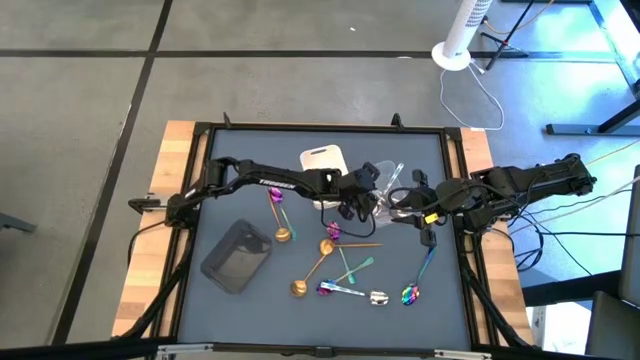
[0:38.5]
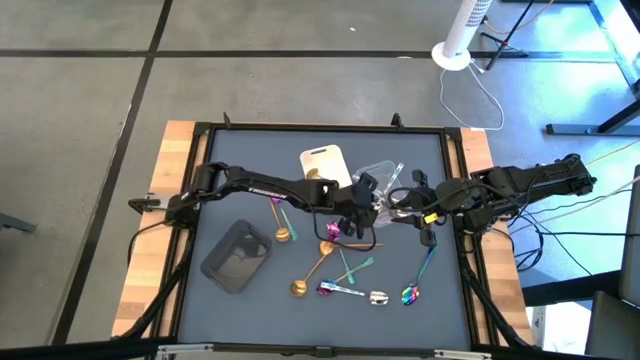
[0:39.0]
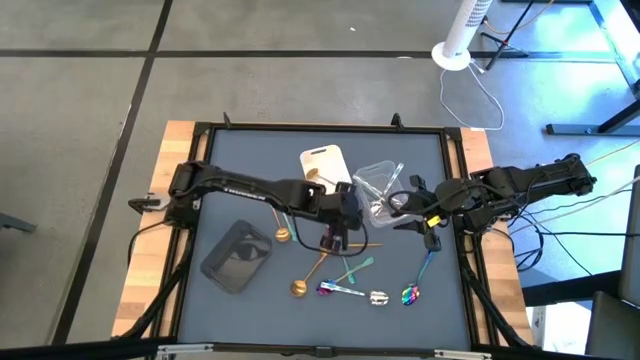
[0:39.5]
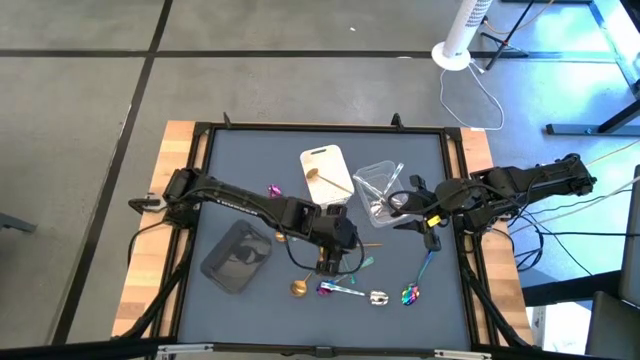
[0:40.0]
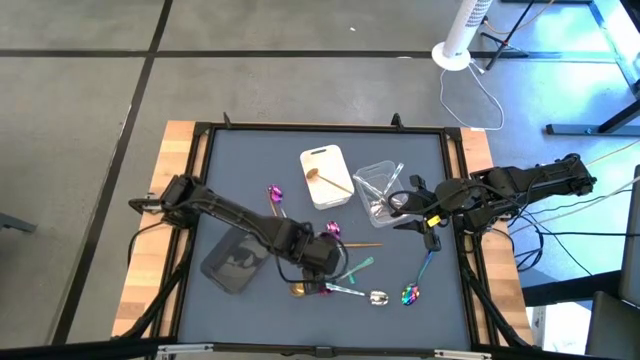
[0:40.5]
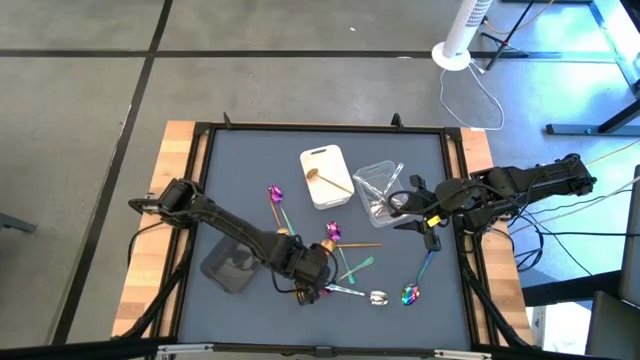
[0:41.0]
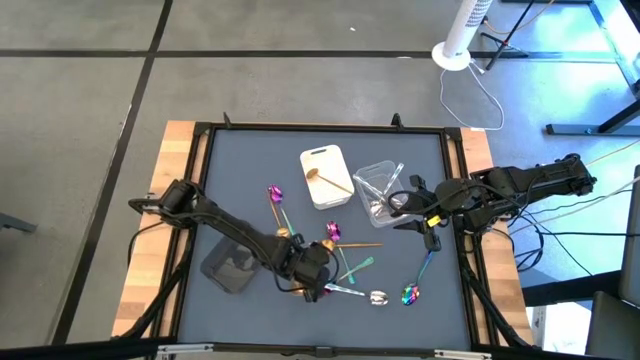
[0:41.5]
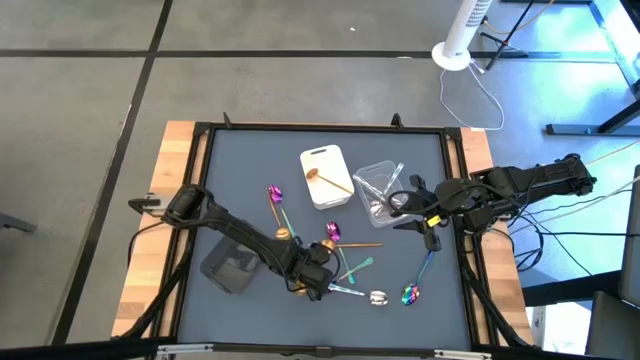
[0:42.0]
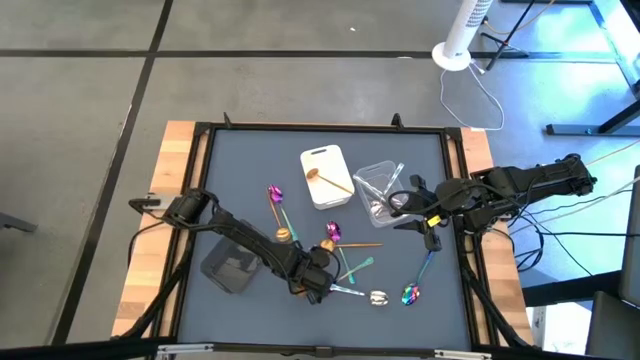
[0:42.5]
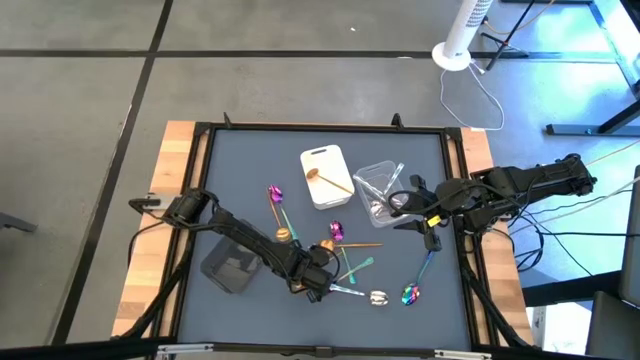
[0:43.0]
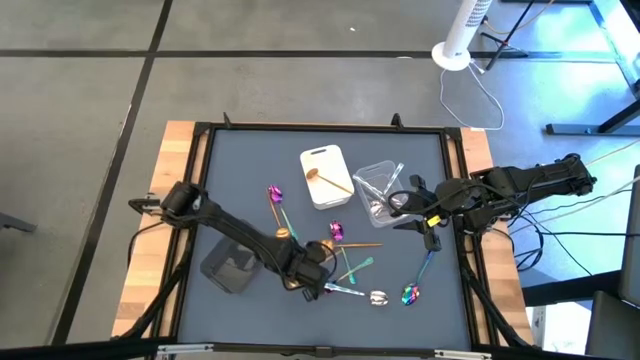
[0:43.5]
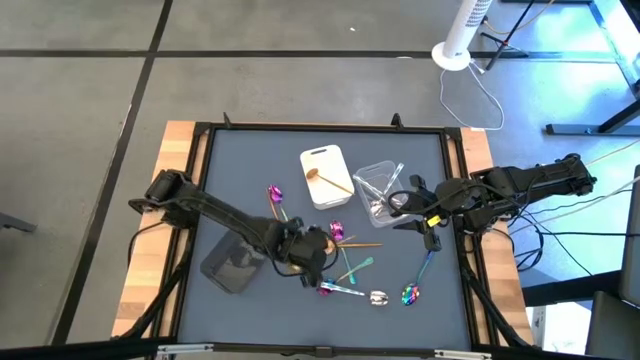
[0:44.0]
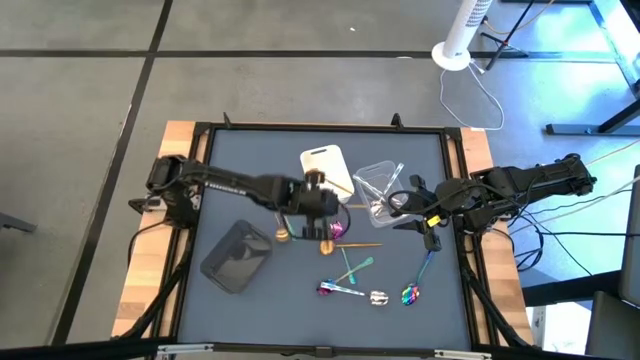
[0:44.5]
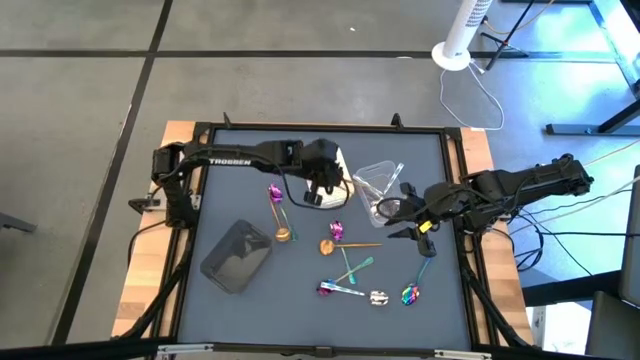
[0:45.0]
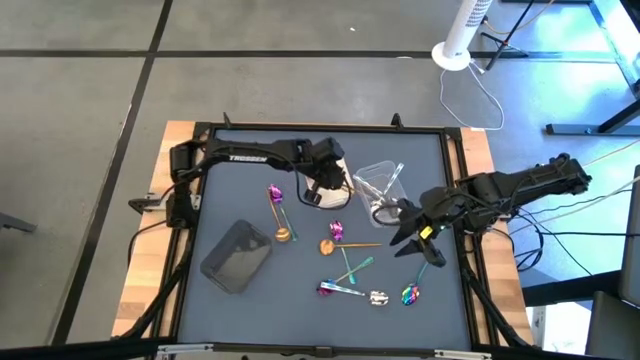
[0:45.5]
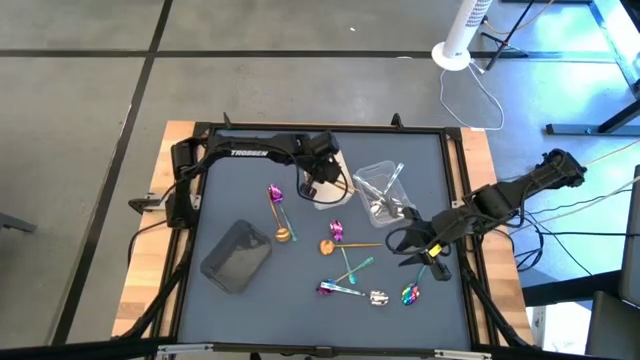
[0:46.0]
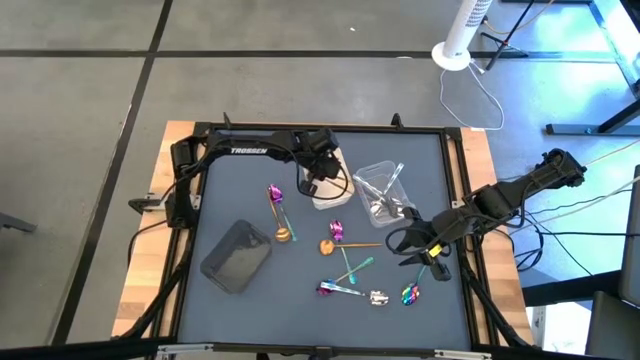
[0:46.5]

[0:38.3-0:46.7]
Task: Sort silverware by color (type)
Put the gold spoon into the white bin

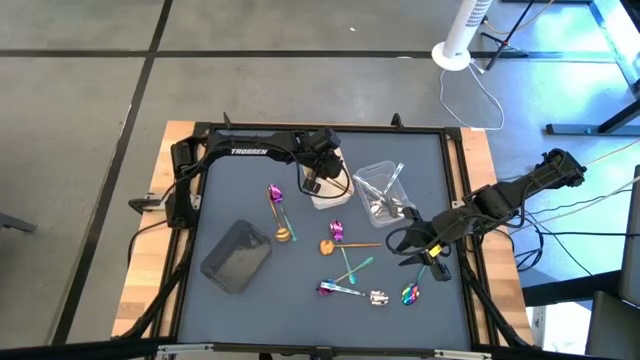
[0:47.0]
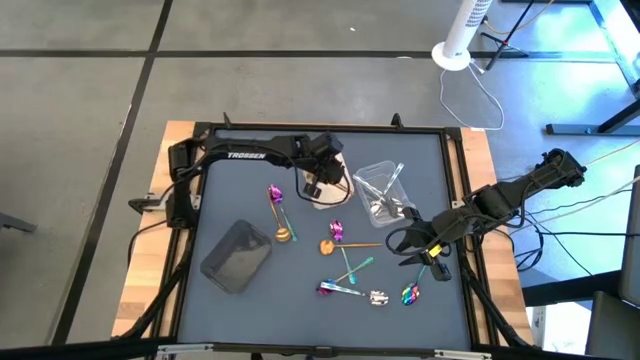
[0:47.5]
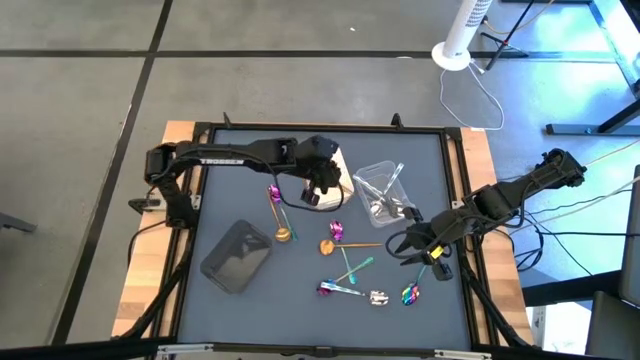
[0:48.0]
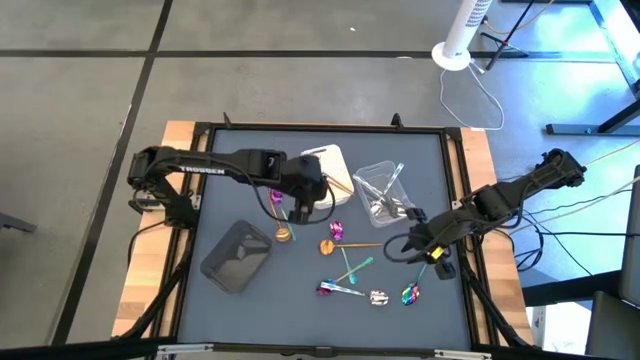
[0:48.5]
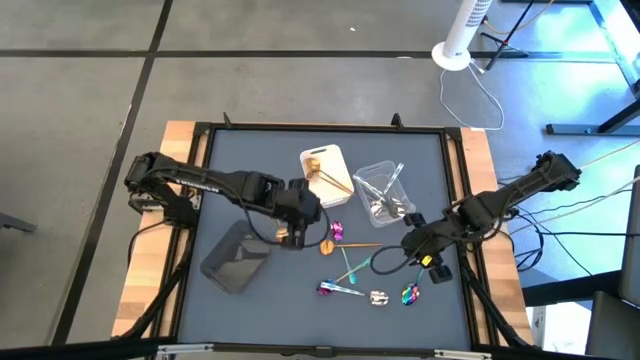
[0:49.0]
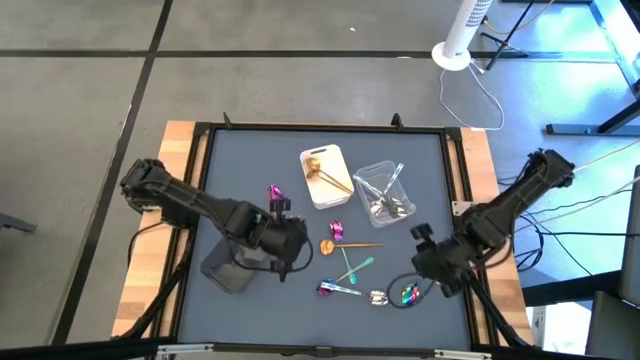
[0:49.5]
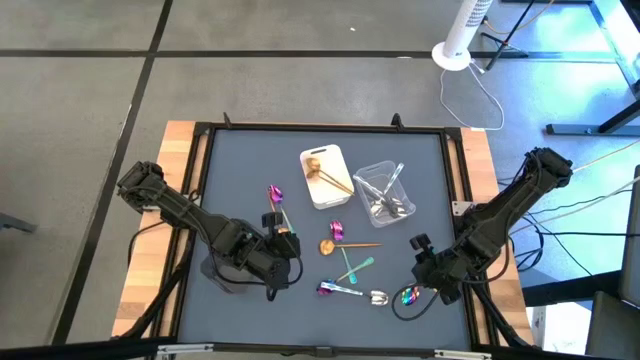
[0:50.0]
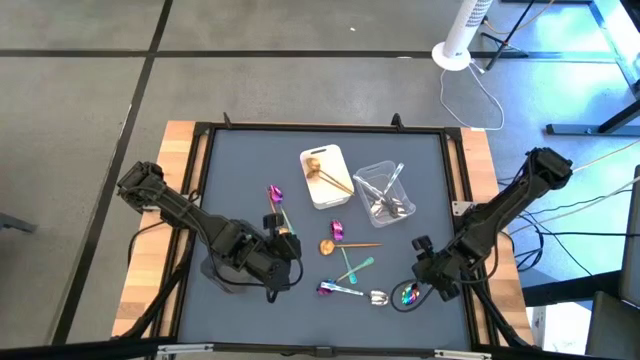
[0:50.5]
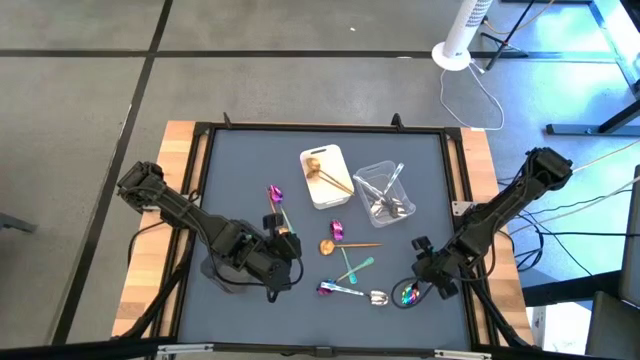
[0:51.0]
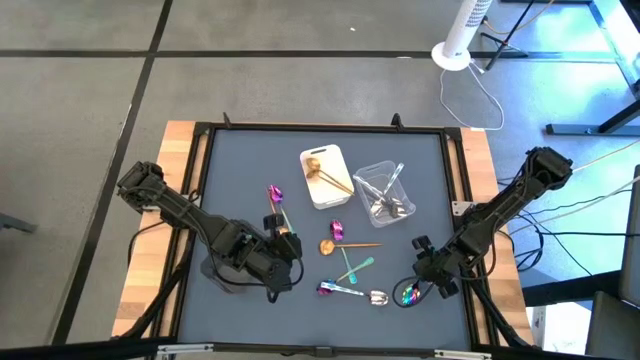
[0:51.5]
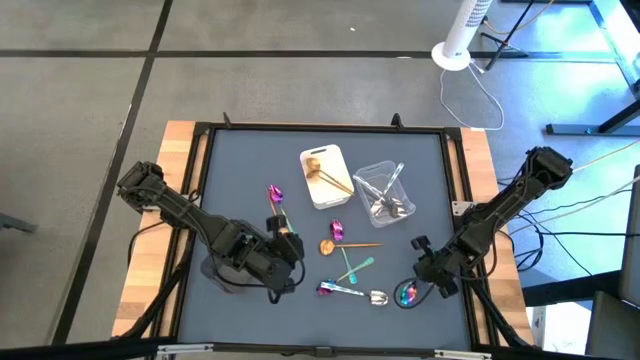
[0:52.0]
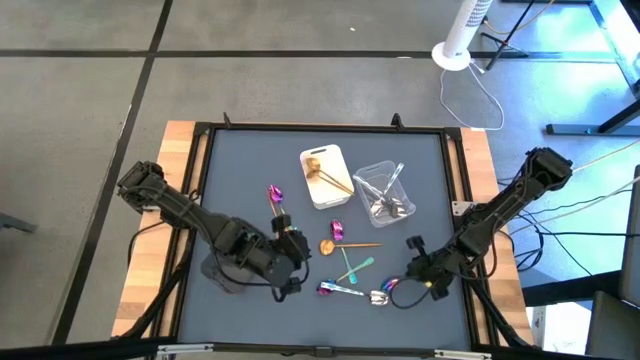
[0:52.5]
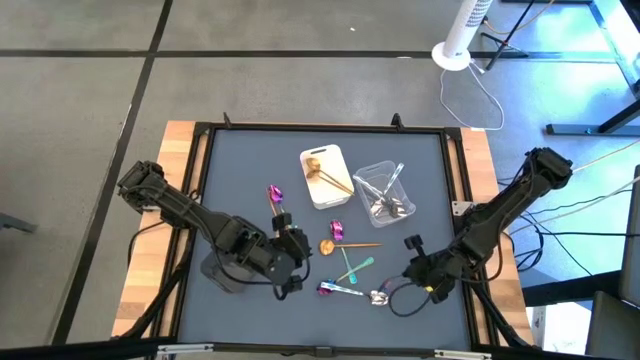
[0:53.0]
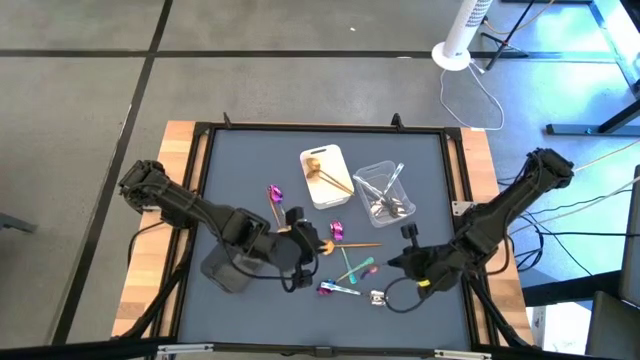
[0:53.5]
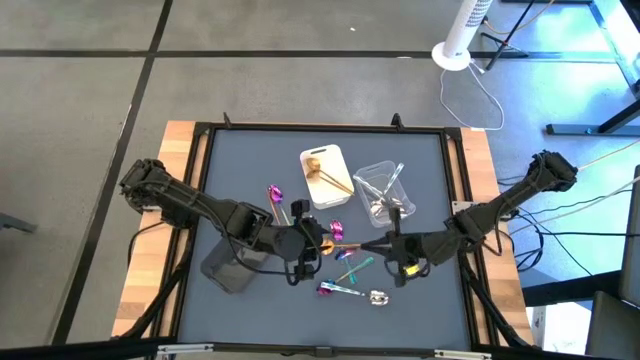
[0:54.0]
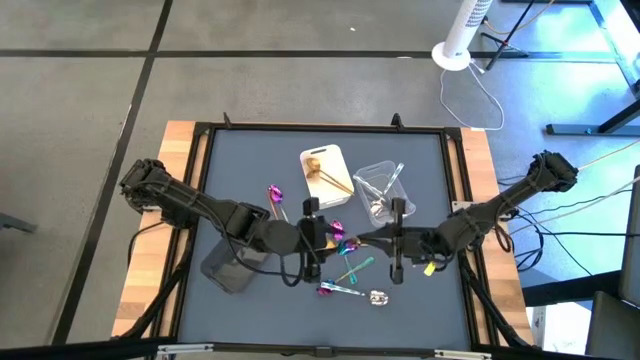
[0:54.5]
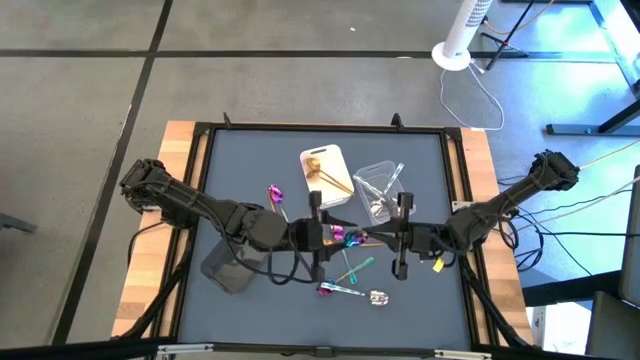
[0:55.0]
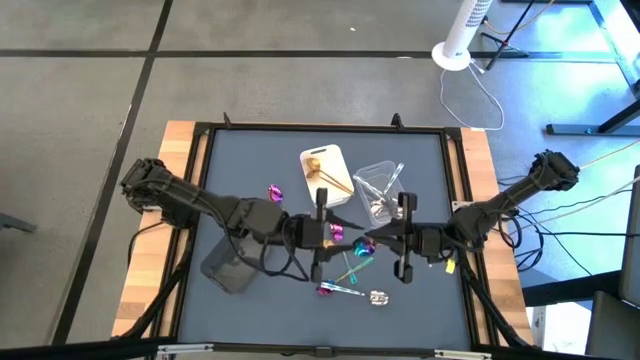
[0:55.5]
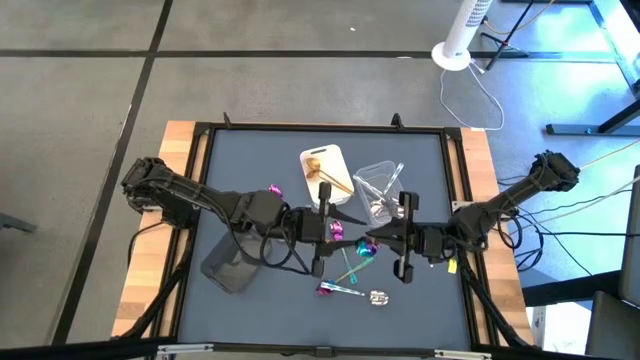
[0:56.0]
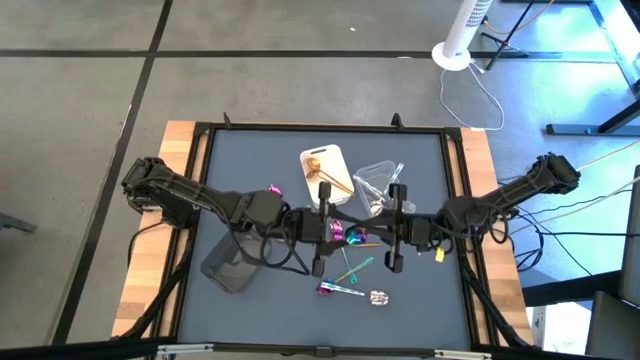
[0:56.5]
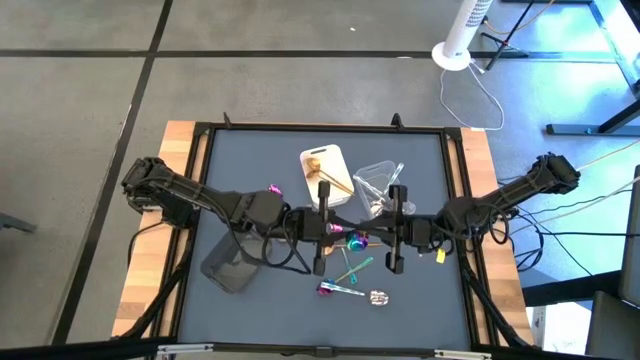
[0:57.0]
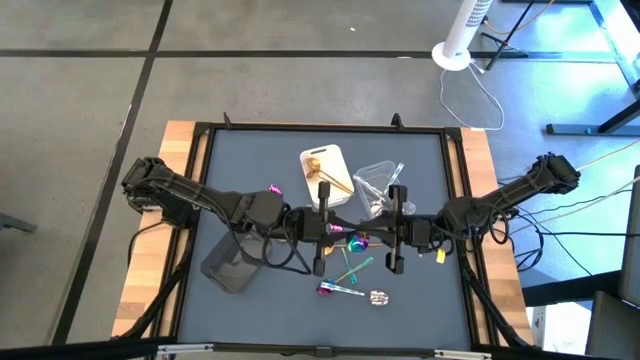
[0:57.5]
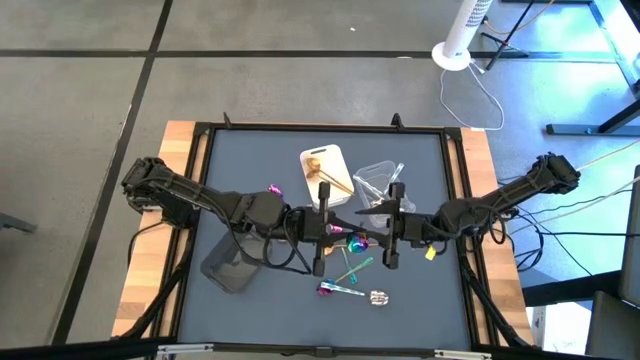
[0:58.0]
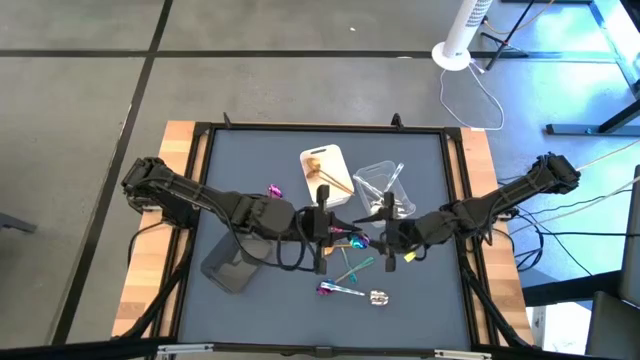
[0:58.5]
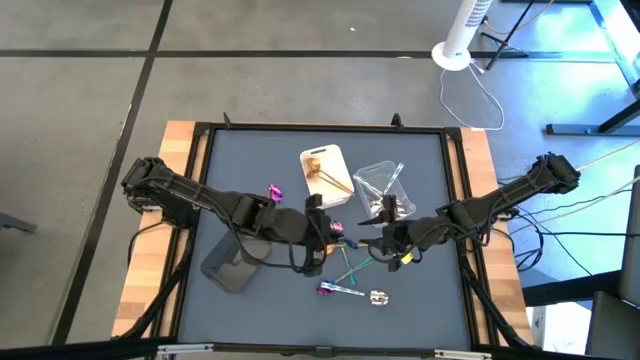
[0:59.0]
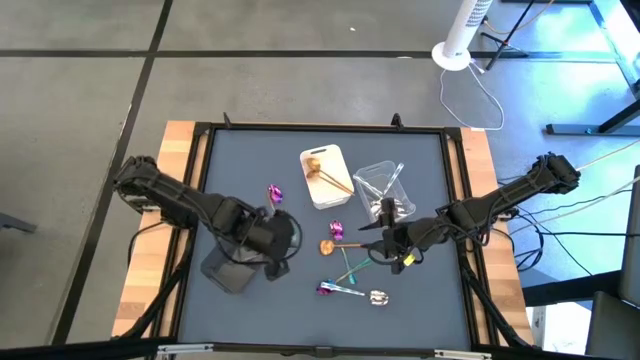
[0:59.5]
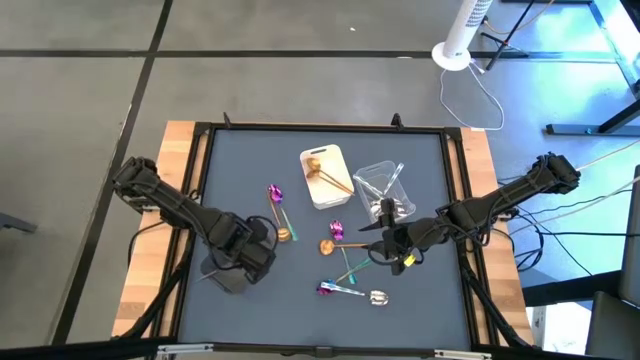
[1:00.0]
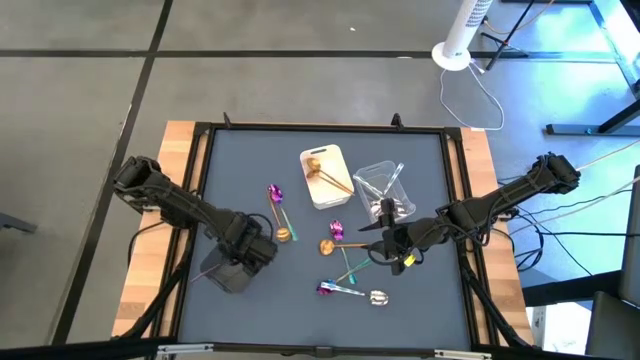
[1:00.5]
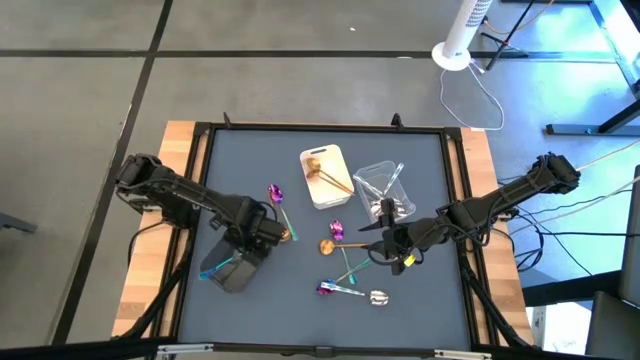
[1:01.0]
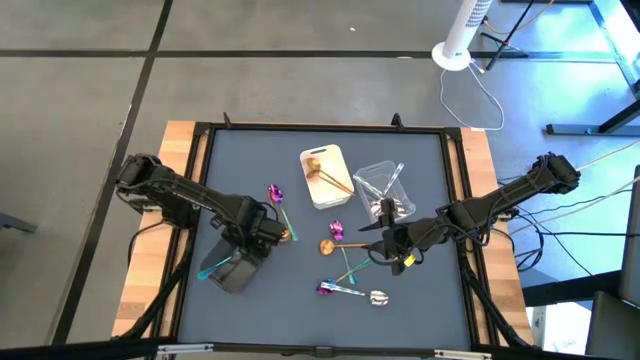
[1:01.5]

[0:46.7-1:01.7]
Put the iridescent spoon into the black bin
